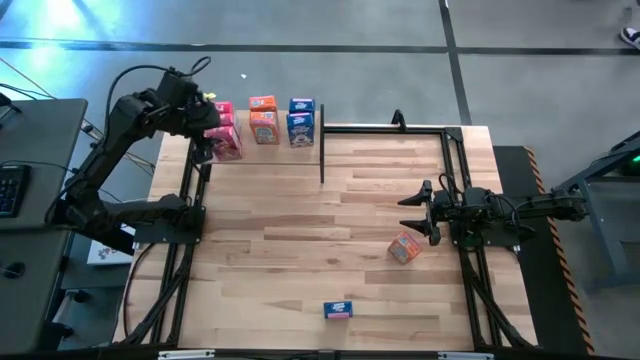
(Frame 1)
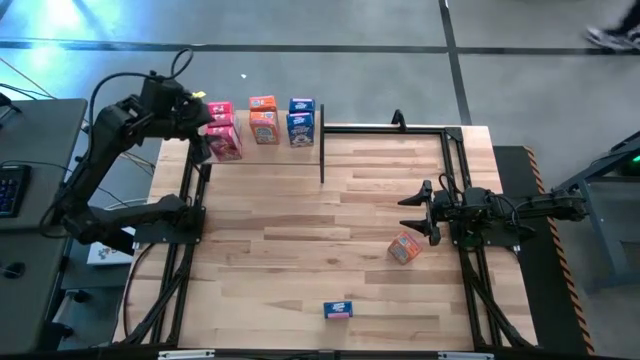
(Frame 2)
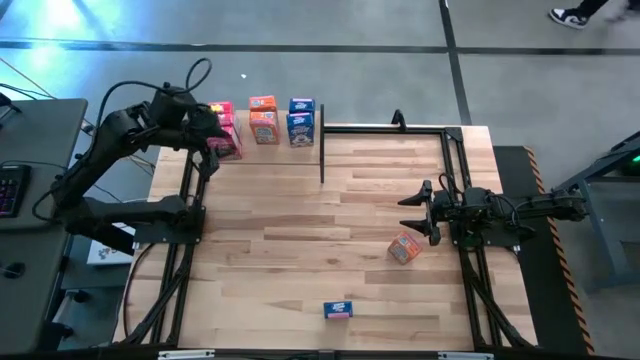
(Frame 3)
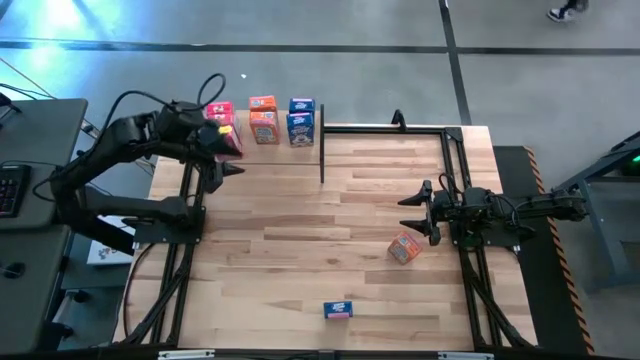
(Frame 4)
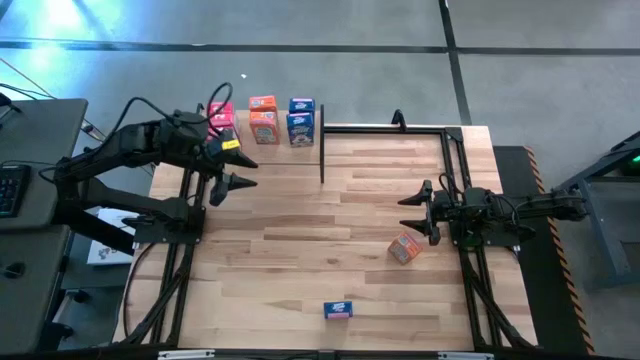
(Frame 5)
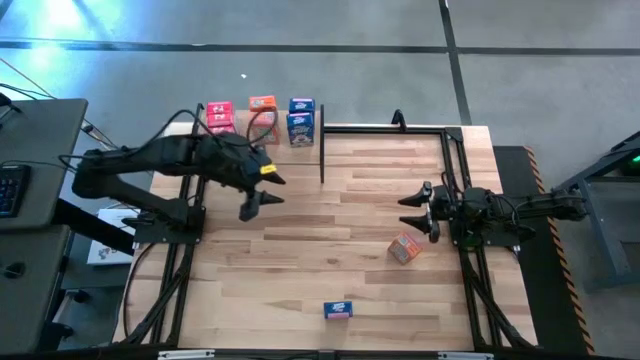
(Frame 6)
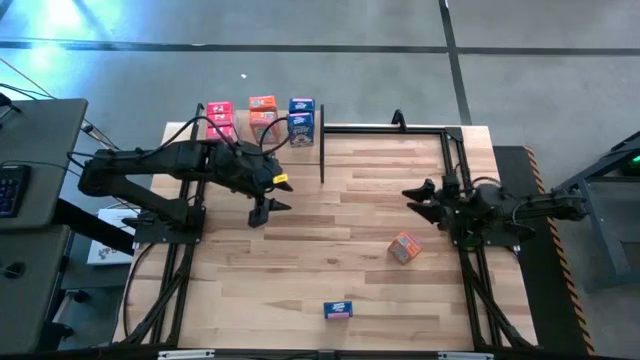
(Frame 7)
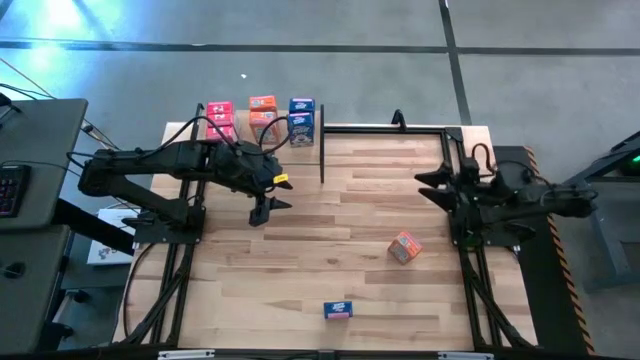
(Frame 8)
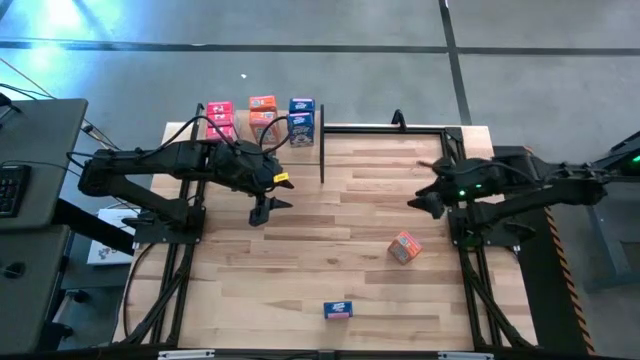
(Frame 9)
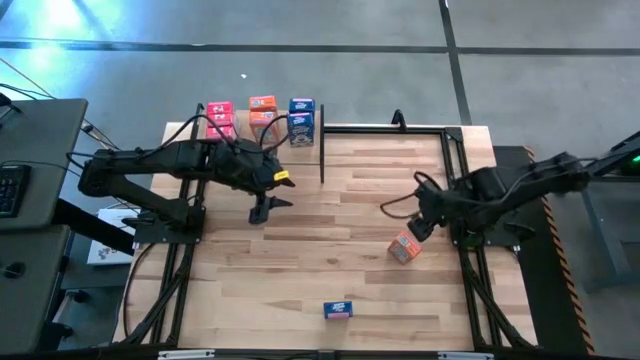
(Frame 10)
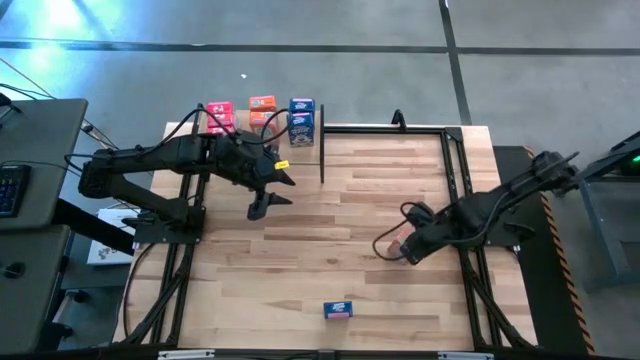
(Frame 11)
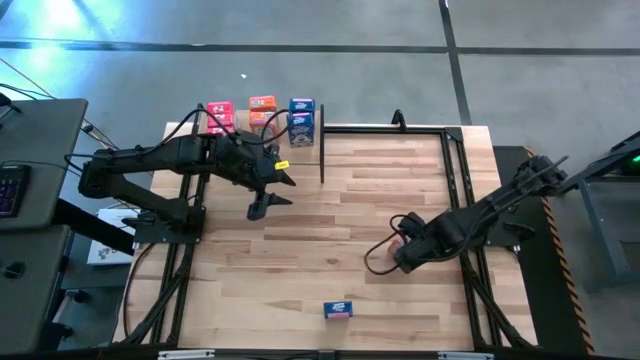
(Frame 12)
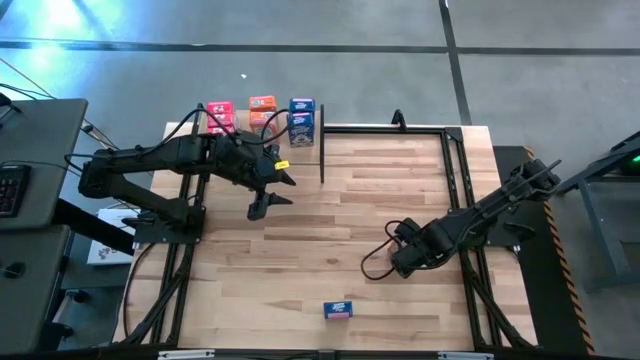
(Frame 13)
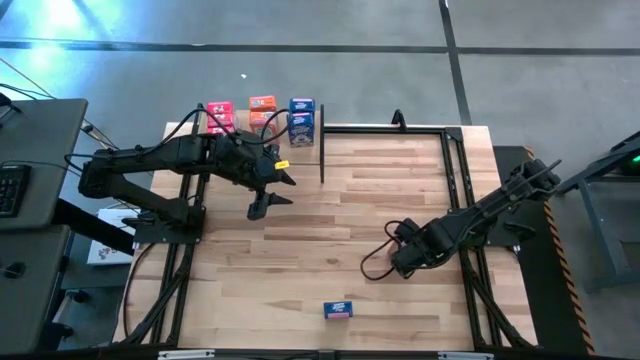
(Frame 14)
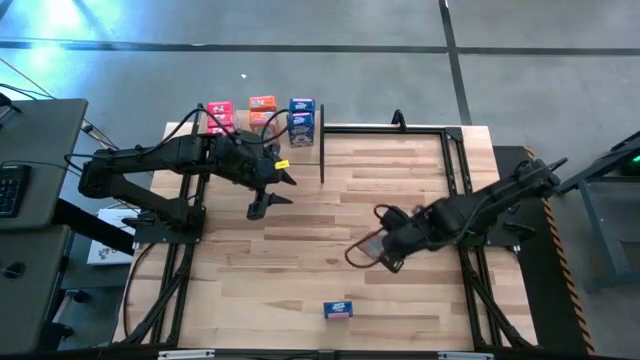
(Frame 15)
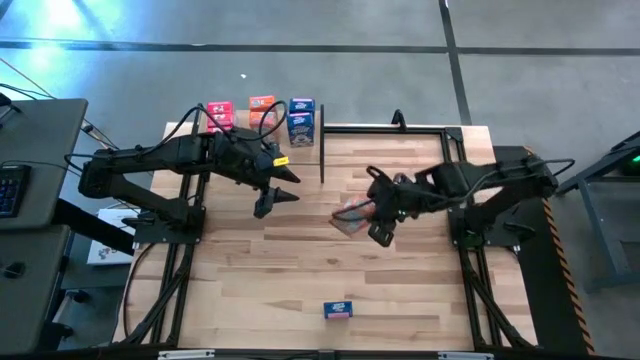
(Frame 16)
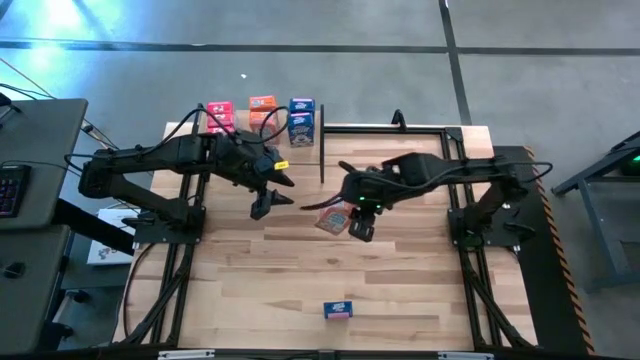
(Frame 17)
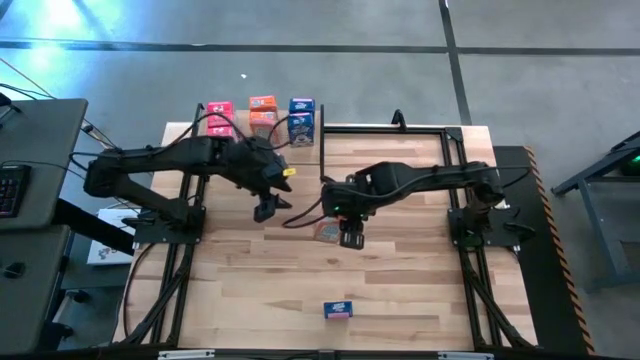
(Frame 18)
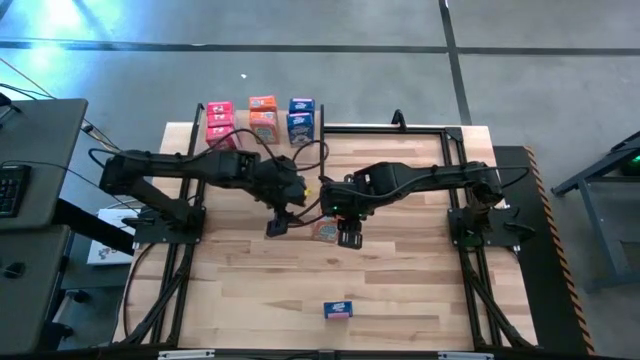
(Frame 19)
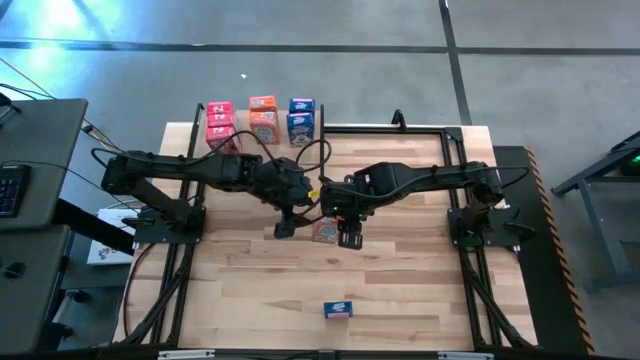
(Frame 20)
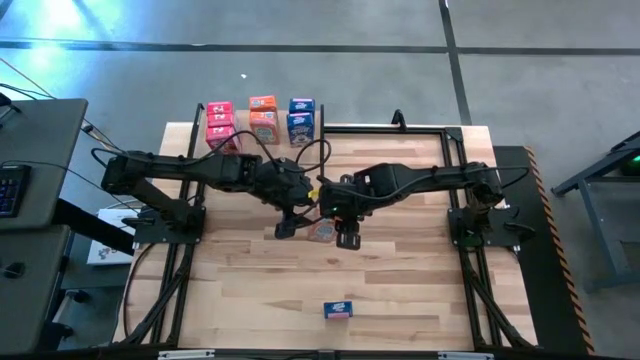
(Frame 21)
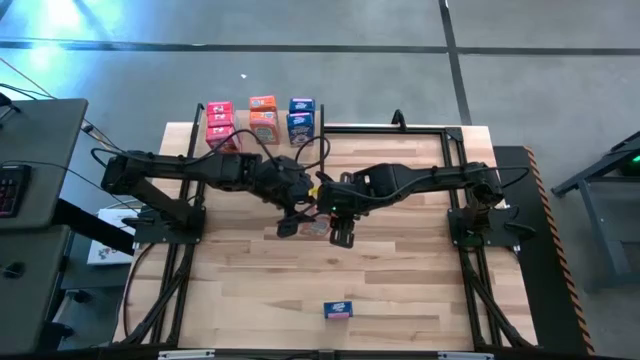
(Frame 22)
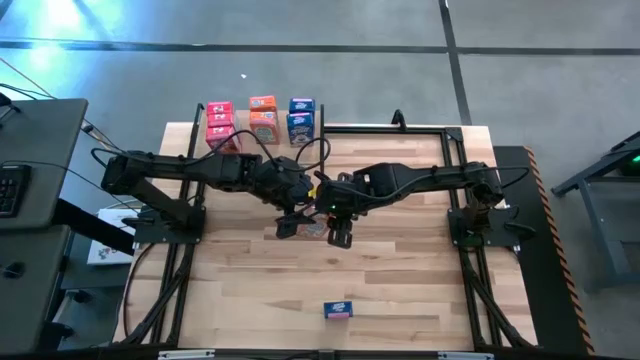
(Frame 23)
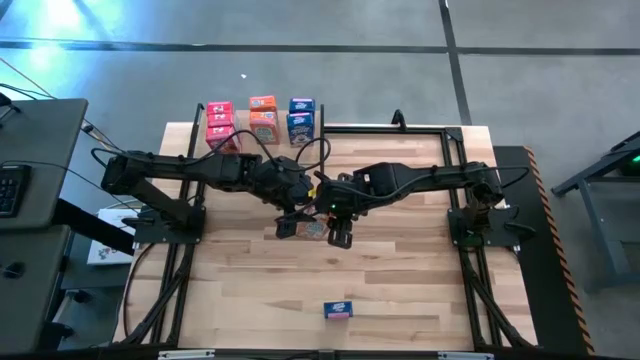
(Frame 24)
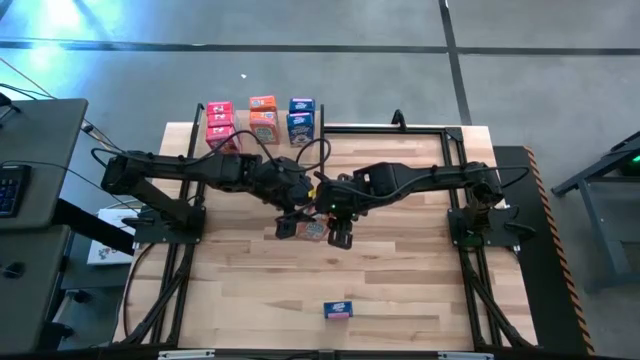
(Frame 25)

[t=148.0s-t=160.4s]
Task: Stack cereal on shelf
Put the orange cereal box on the the shelf aligned with the other orange cereal boxes

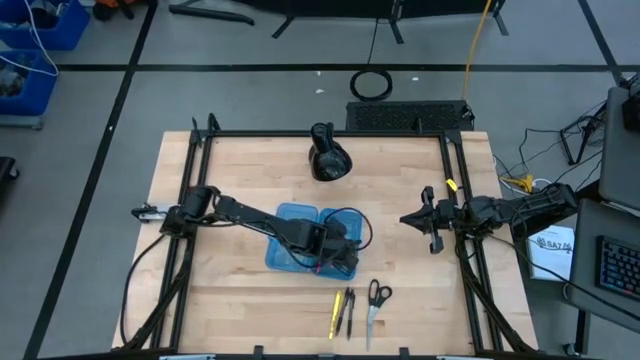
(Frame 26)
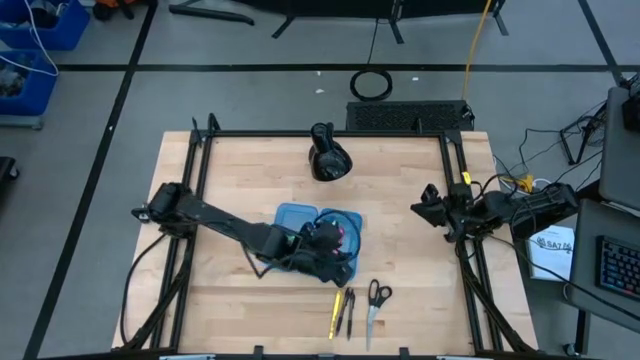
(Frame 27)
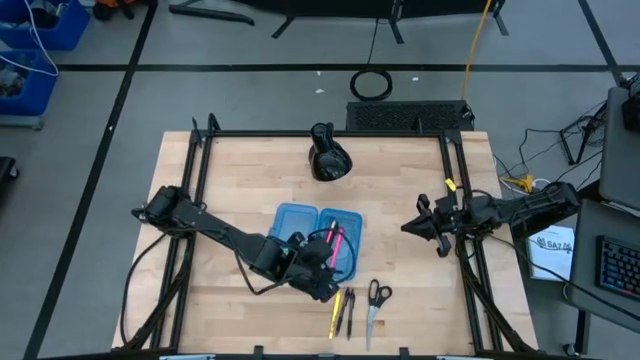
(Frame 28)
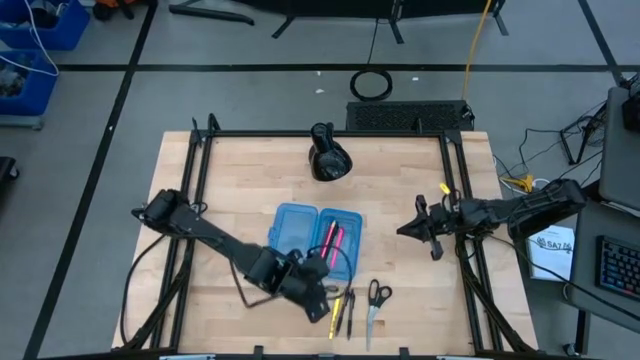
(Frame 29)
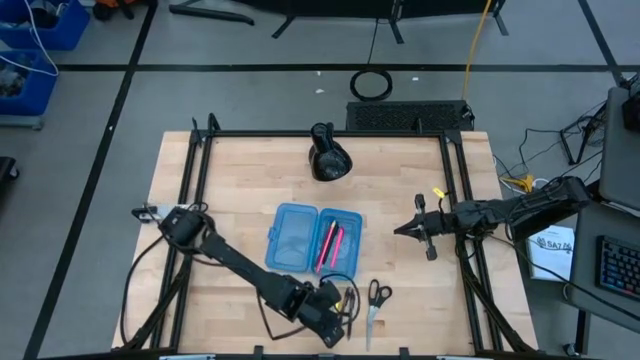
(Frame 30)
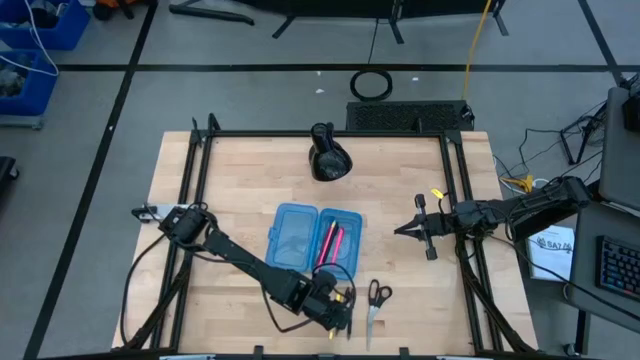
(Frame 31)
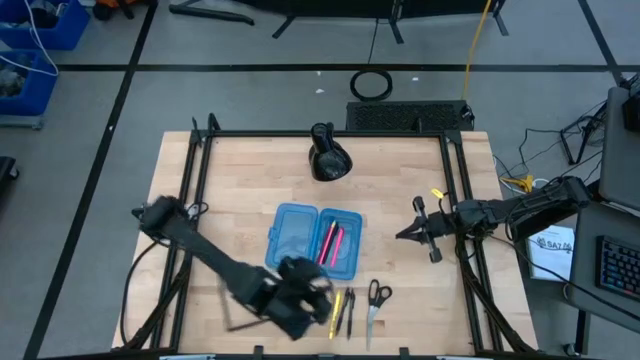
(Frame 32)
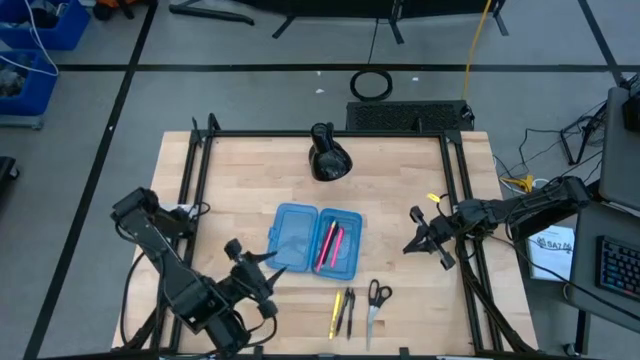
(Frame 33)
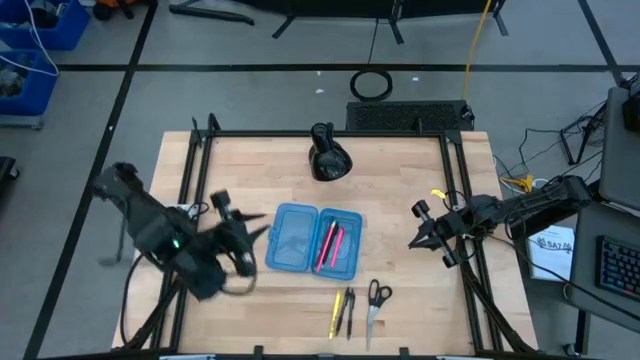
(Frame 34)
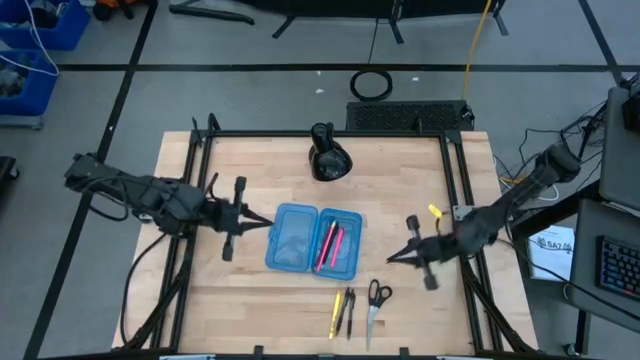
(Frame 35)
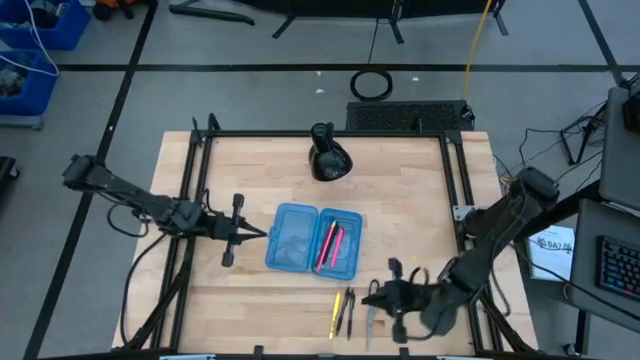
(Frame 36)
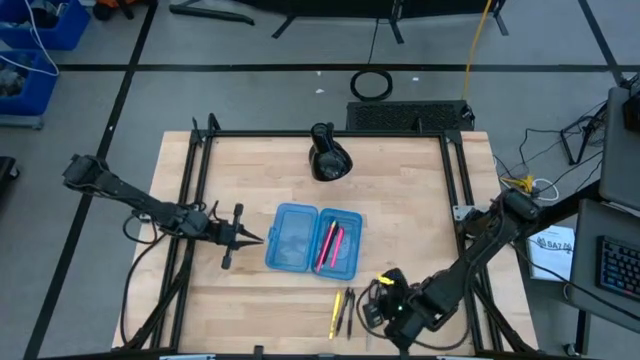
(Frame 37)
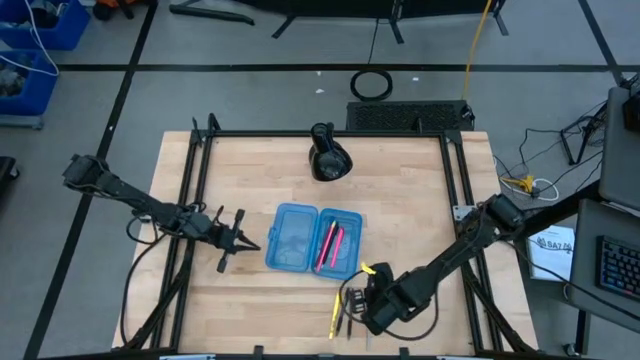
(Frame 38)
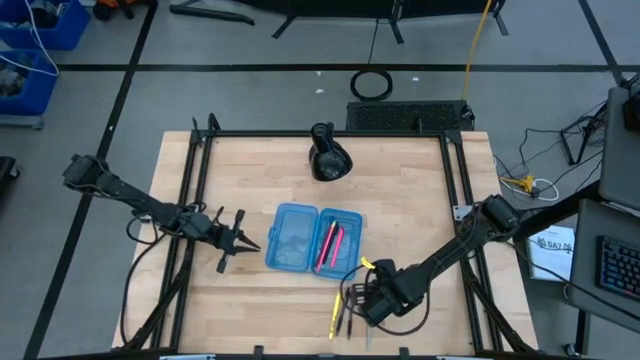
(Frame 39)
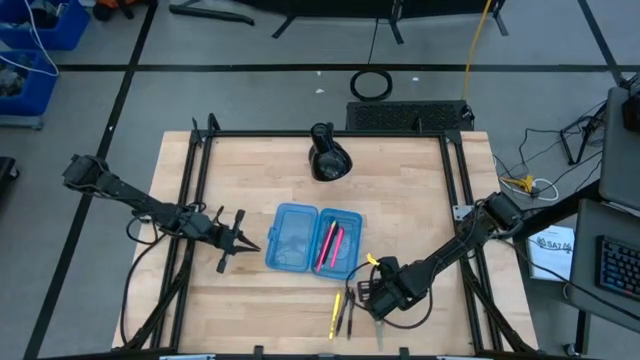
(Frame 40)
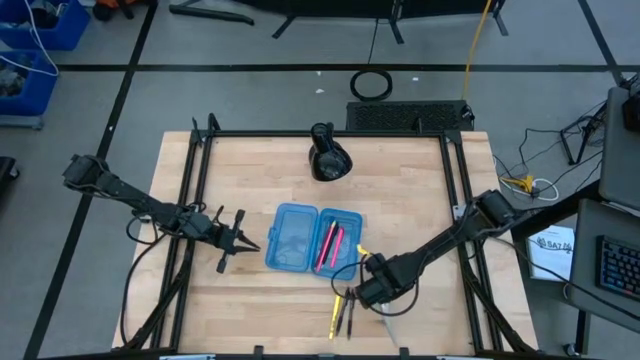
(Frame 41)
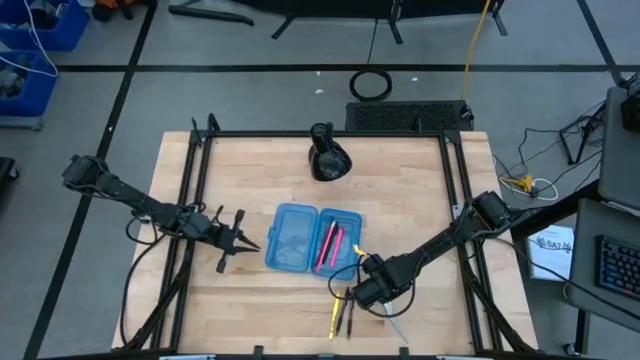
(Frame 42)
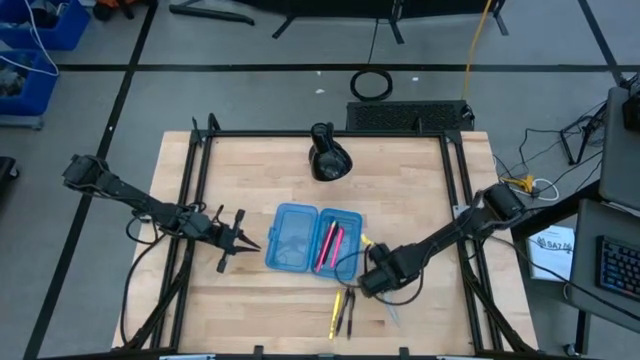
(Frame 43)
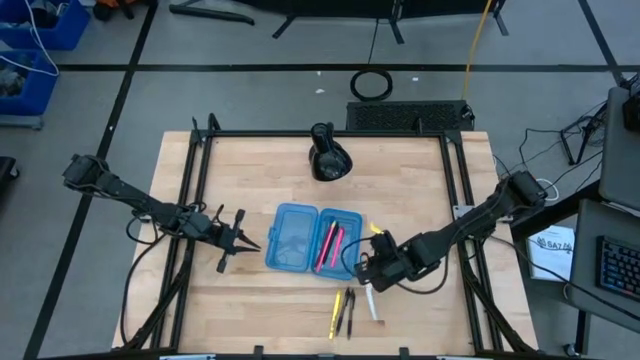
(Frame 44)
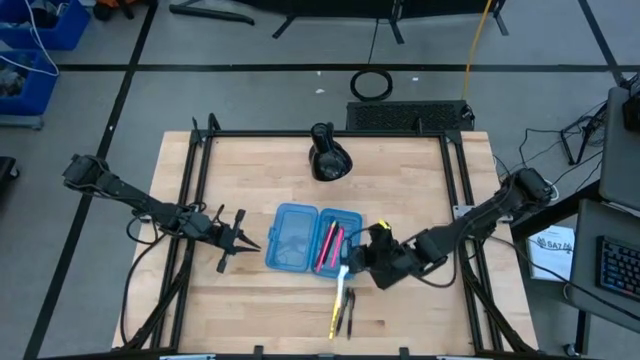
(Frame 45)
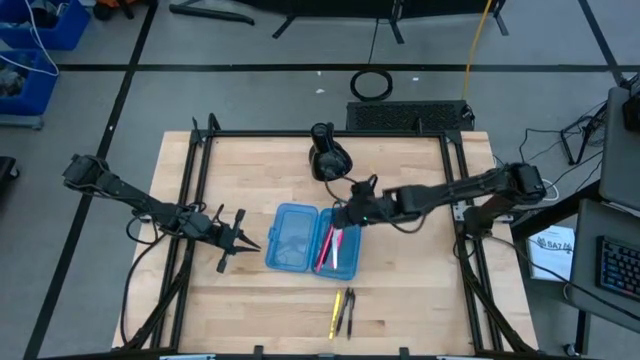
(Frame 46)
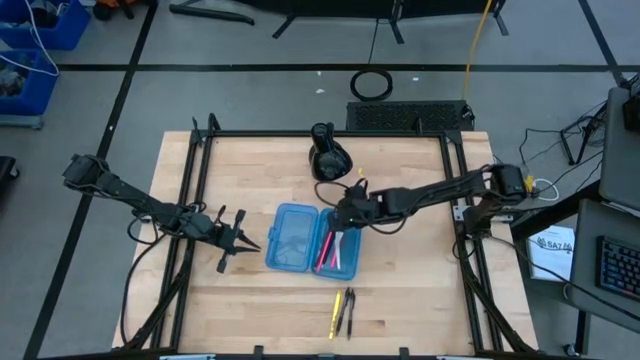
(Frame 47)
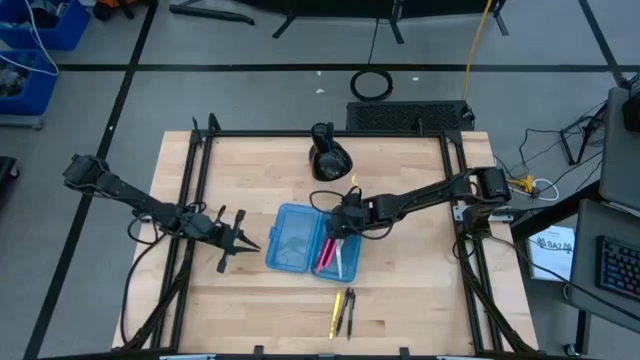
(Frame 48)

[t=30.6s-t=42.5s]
Task: Pick & place school supplies into a supply box
Put the black scissors into the blue supply box
